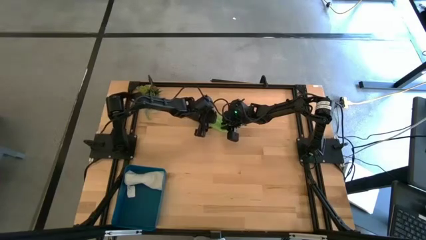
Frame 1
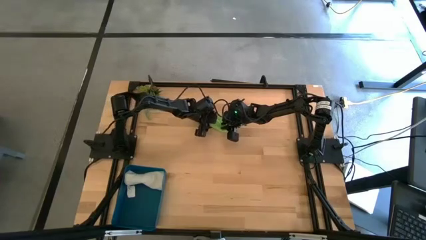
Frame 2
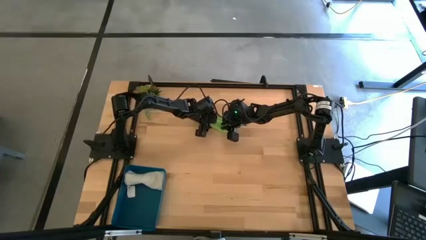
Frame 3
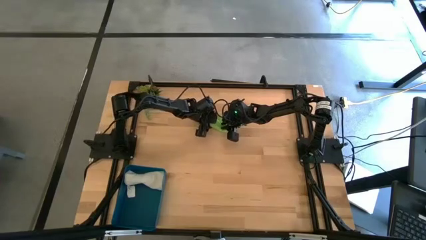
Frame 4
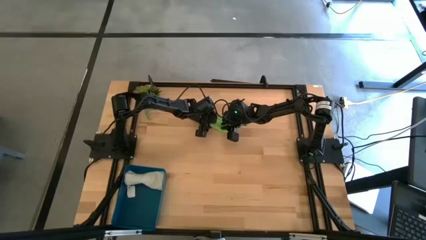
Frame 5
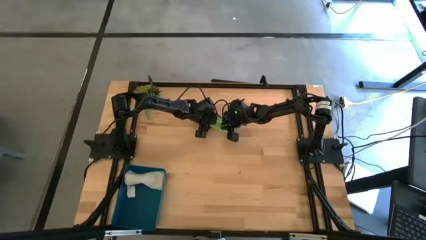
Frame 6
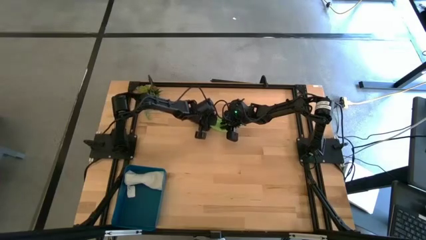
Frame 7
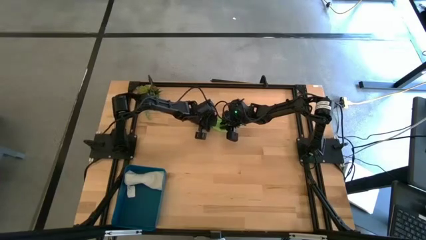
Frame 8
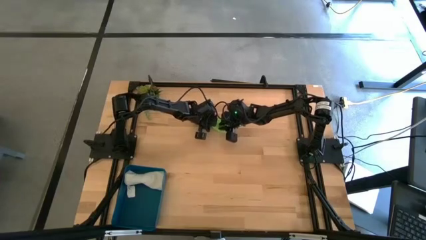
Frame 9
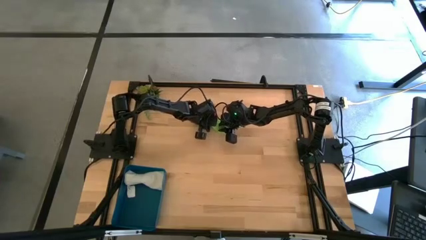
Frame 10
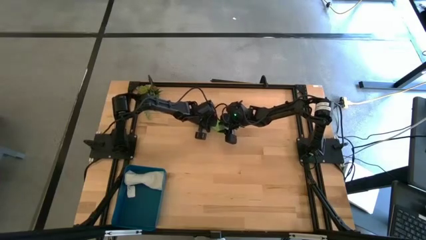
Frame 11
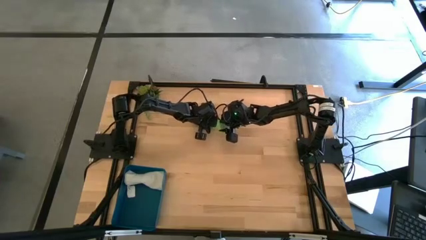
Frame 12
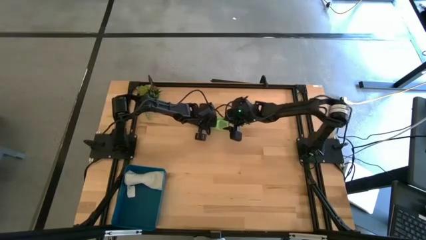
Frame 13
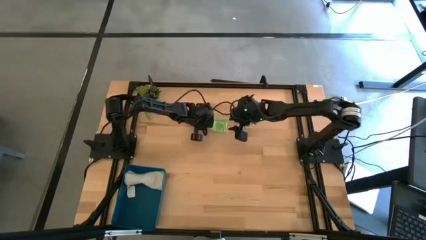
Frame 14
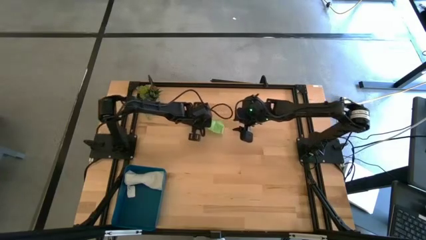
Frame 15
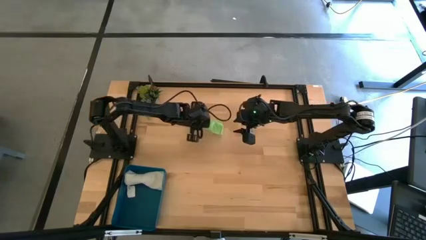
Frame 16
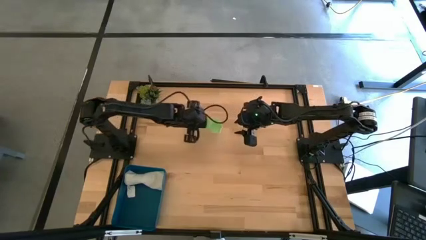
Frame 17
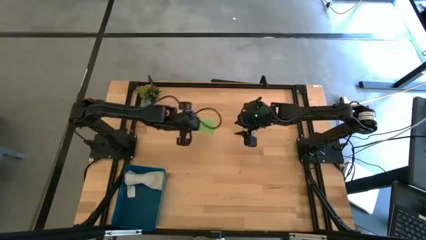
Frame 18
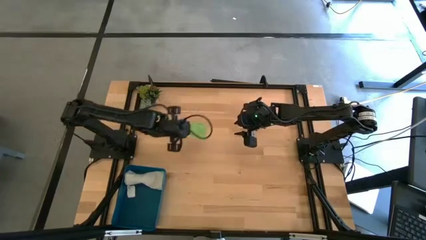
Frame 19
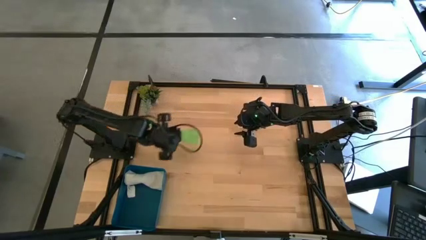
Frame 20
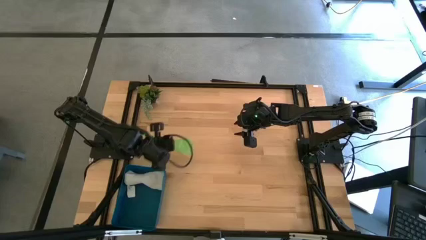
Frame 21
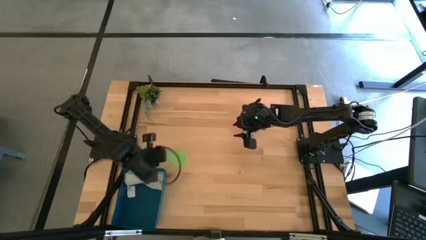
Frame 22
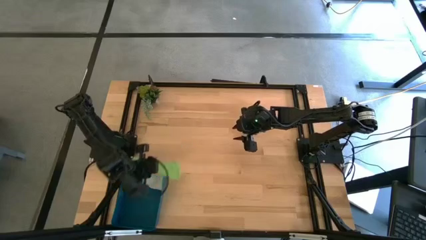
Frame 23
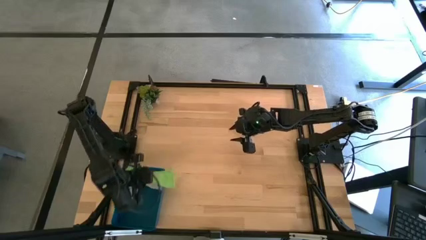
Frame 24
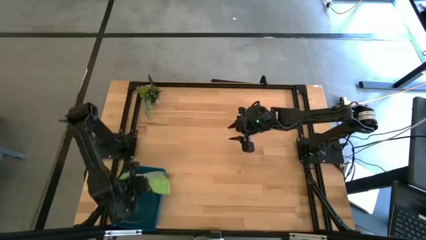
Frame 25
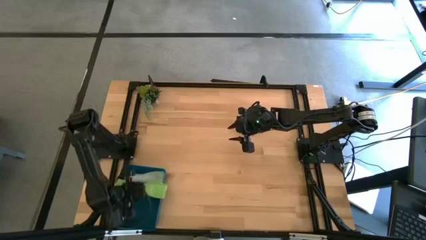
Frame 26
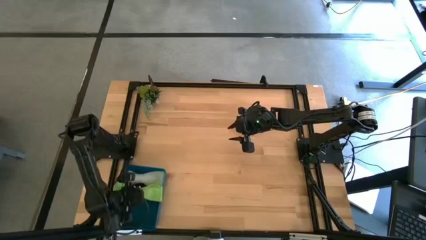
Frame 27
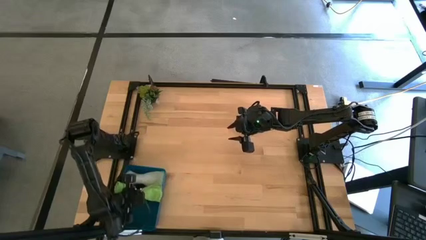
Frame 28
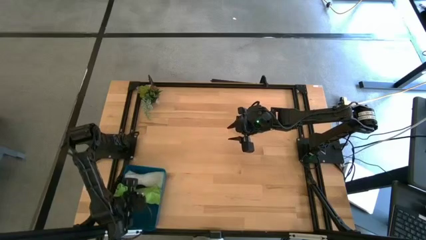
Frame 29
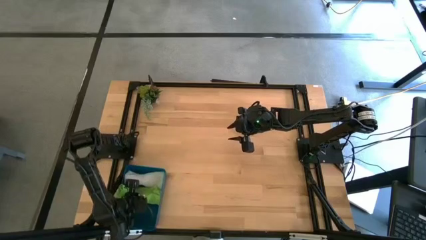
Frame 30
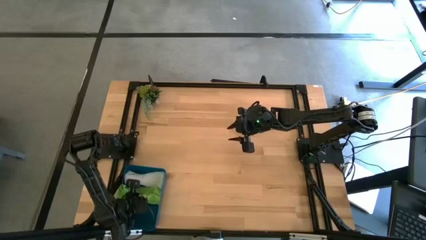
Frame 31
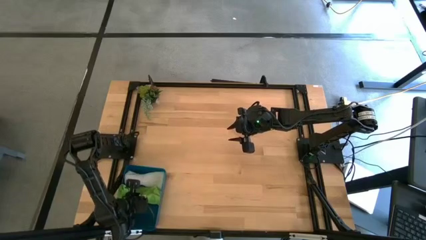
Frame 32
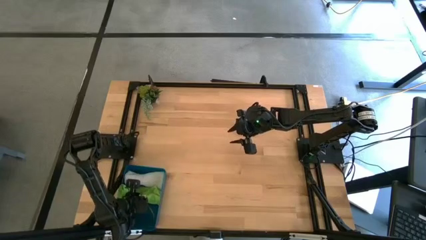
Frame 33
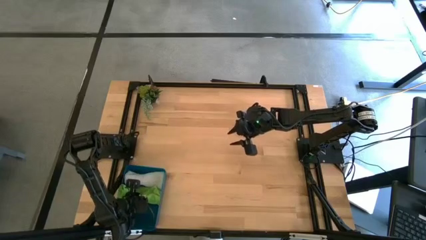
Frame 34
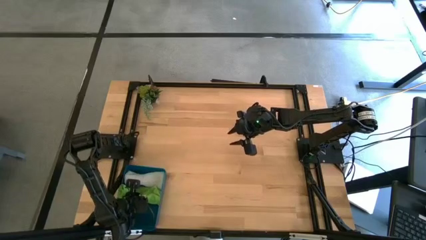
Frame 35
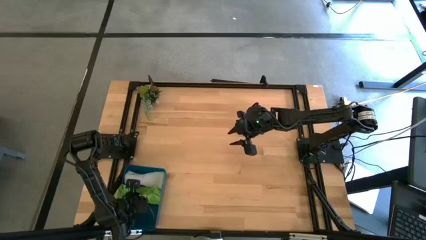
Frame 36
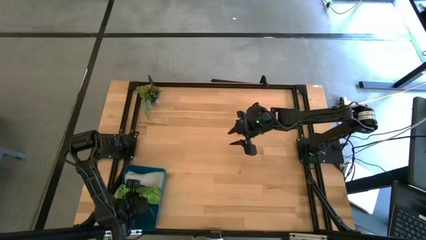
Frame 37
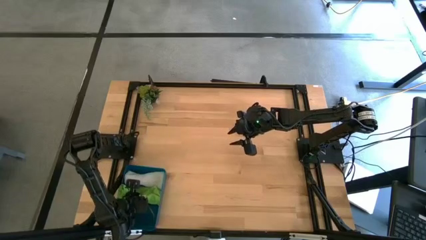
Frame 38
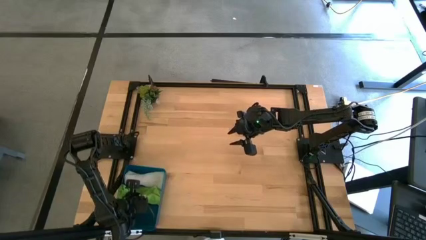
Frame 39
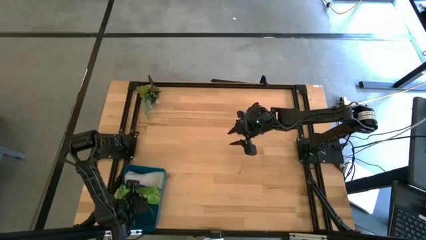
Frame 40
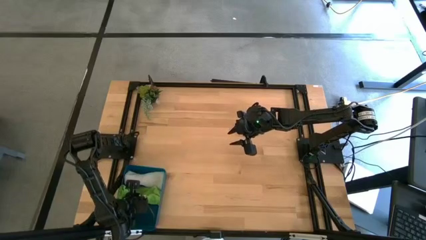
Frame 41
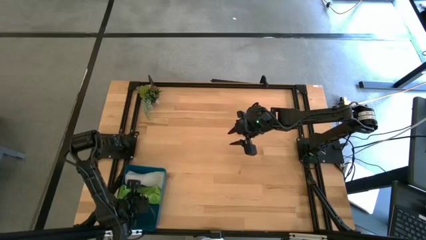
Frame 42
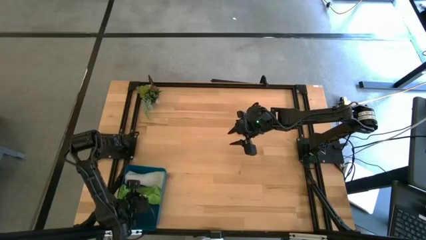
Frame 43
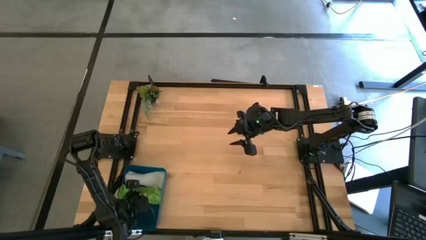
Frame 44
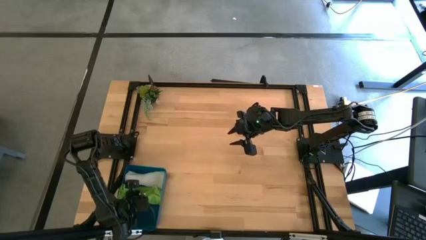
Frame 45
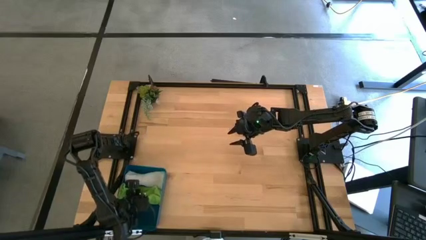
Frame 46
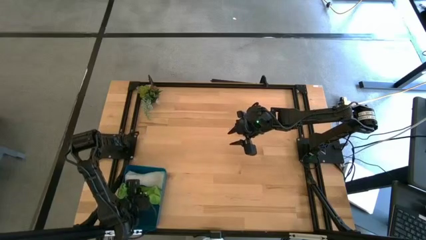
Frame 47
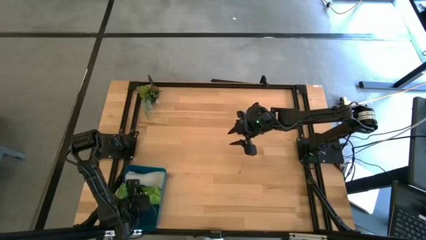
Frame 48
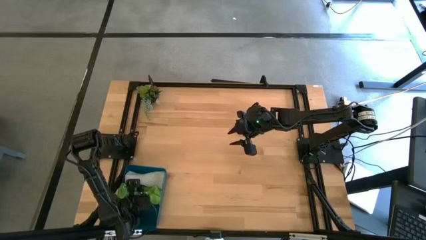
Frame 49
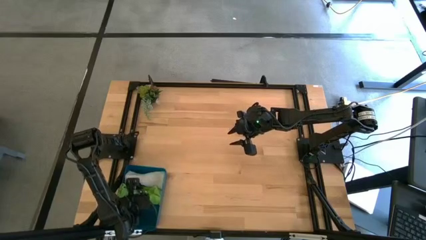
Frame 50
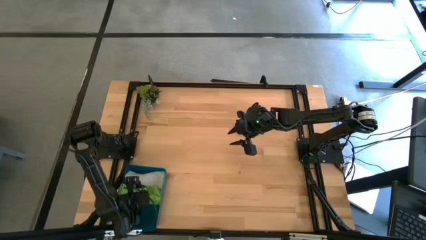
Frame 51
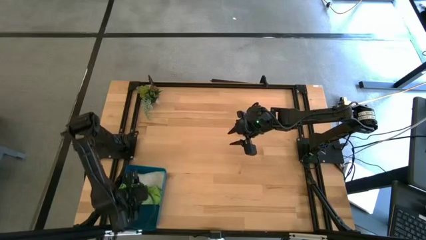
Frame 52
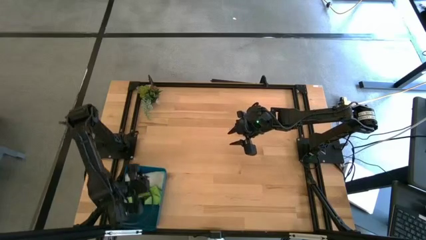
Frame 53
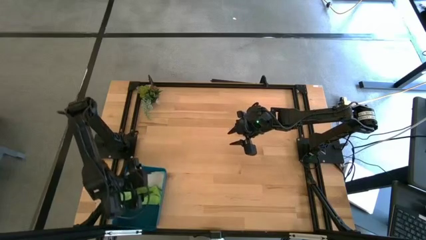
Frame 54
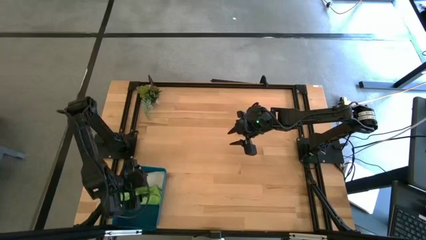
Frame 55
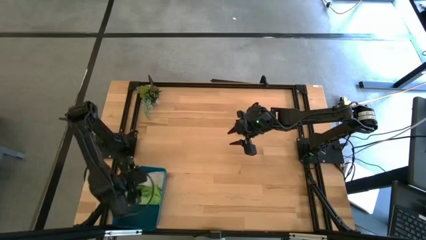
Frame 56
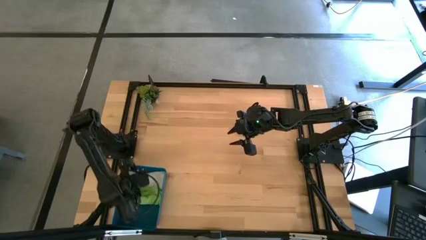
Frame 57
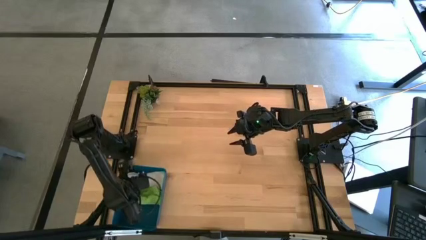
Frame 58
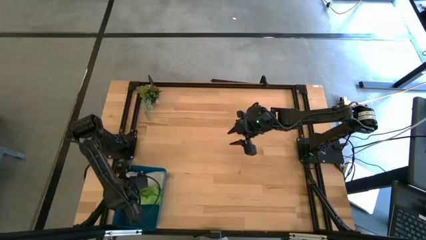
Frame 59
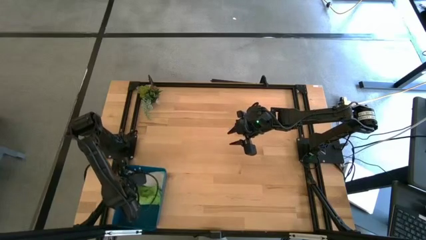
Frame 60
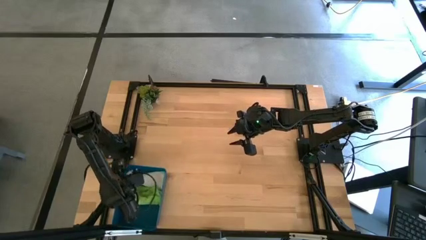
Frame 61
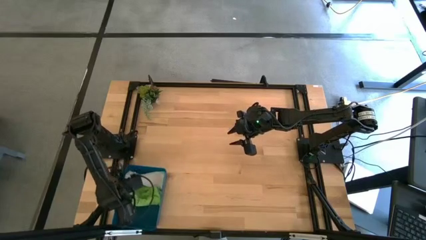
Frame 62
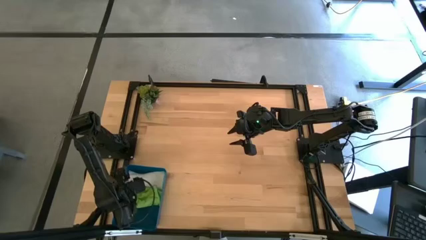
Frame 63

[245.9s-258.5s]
Task: Roll microfiber towels into tight, uniform cylinder then place into a basket
Put the rolled green towel into the blue bin
